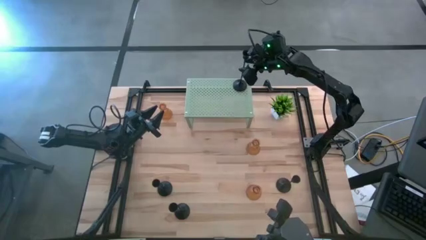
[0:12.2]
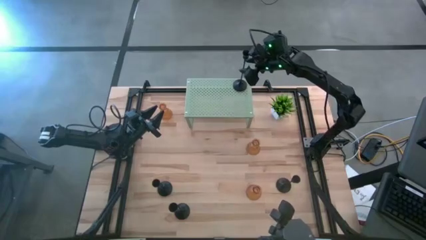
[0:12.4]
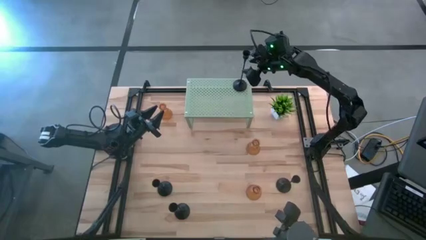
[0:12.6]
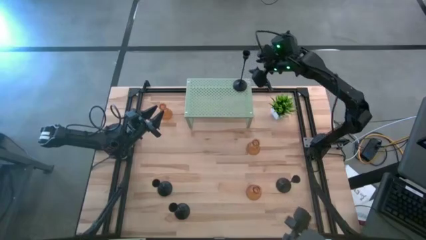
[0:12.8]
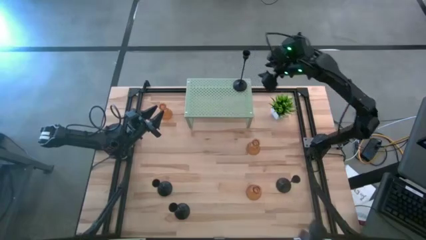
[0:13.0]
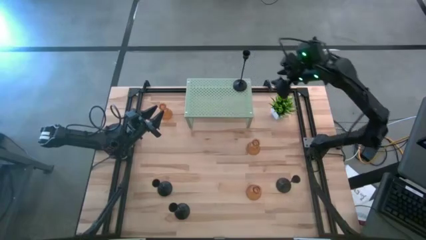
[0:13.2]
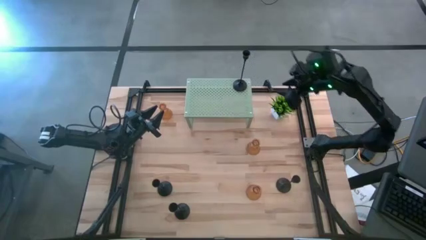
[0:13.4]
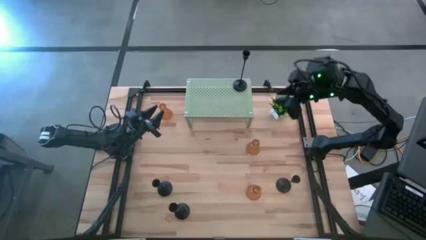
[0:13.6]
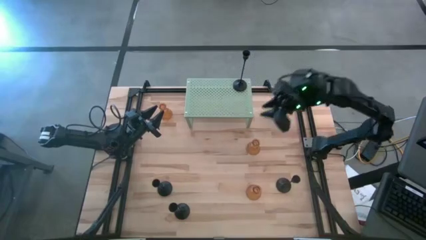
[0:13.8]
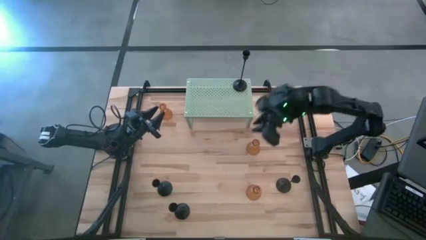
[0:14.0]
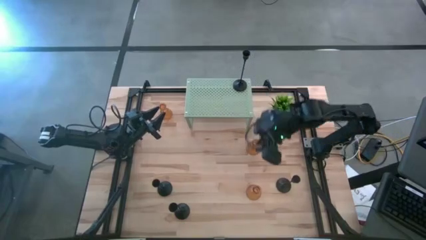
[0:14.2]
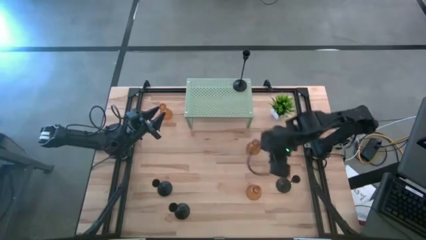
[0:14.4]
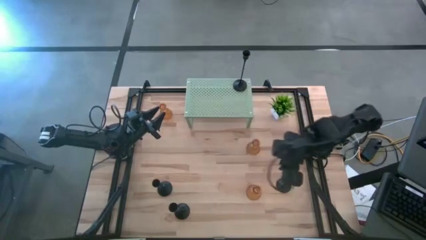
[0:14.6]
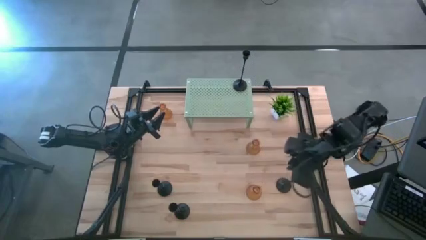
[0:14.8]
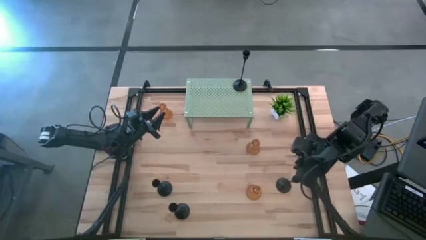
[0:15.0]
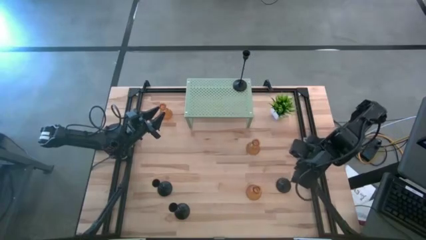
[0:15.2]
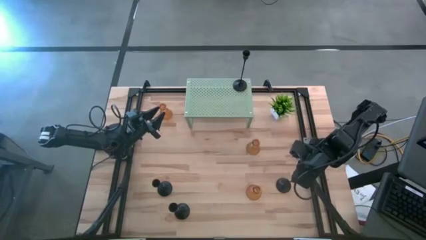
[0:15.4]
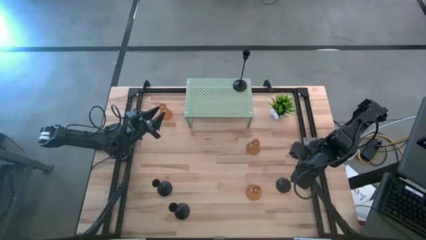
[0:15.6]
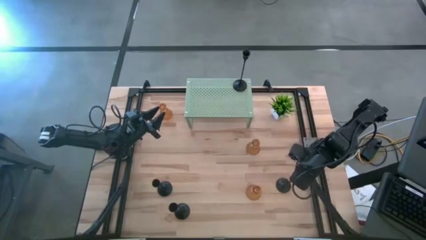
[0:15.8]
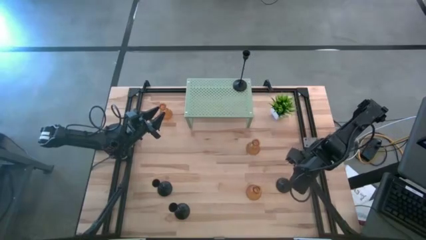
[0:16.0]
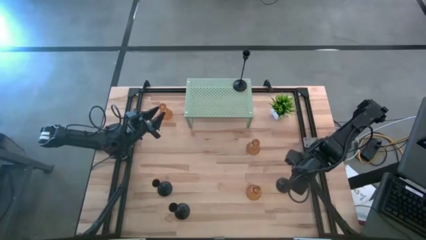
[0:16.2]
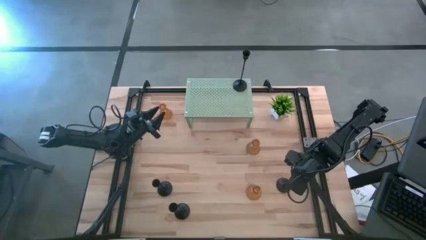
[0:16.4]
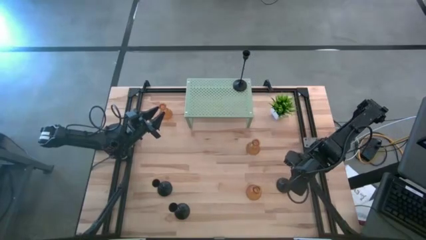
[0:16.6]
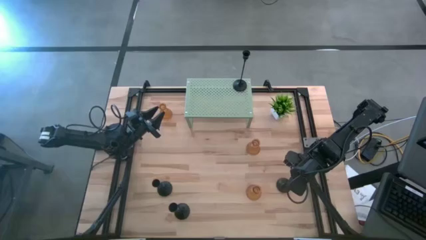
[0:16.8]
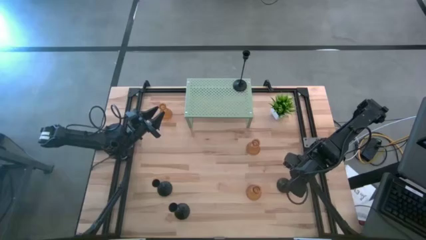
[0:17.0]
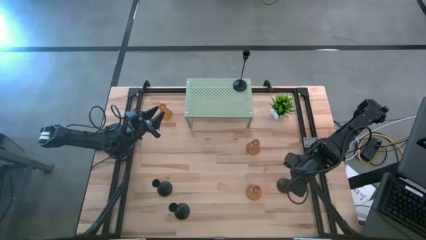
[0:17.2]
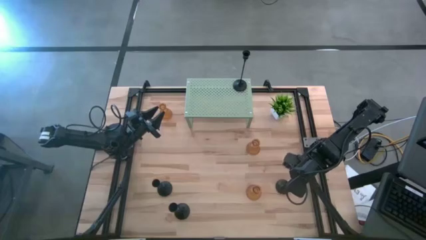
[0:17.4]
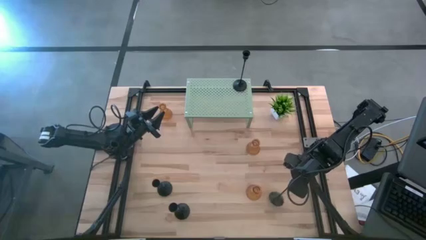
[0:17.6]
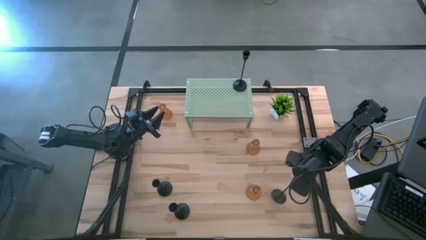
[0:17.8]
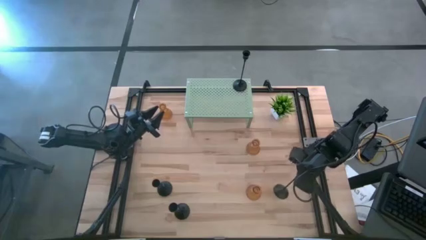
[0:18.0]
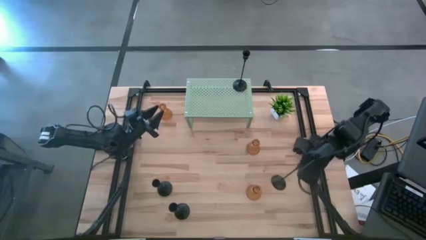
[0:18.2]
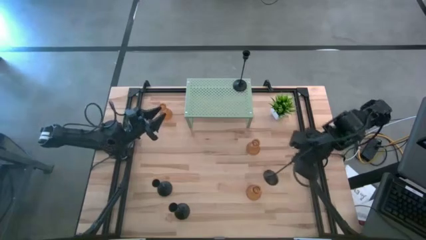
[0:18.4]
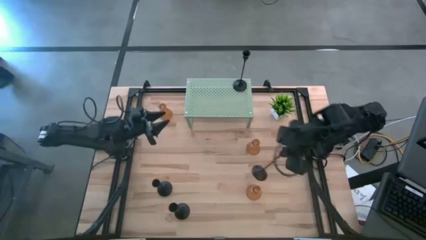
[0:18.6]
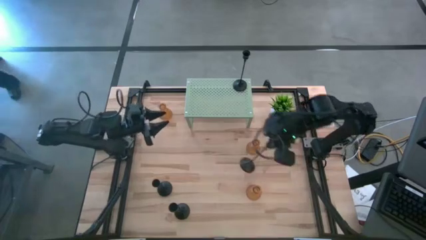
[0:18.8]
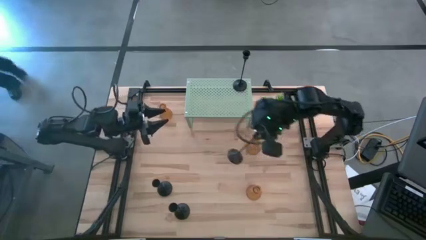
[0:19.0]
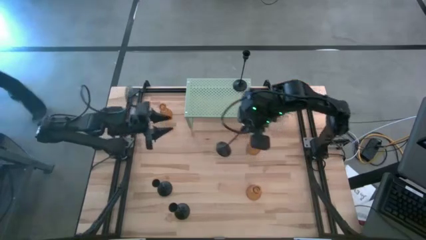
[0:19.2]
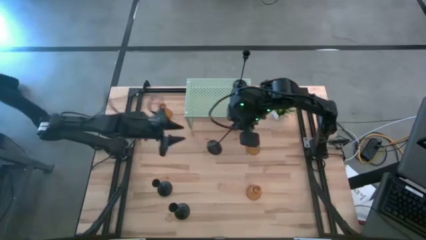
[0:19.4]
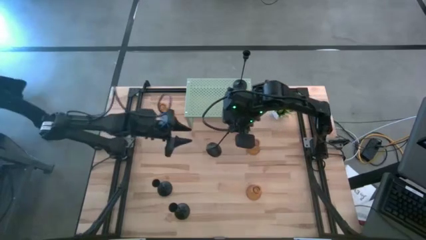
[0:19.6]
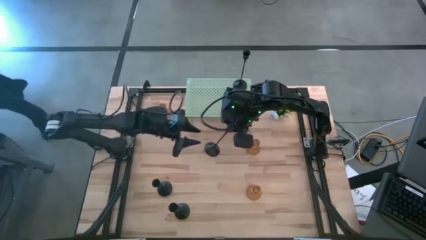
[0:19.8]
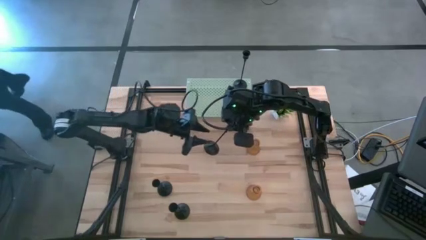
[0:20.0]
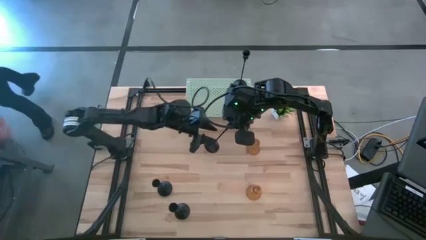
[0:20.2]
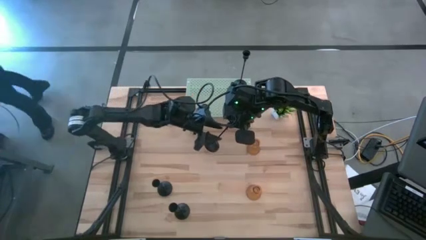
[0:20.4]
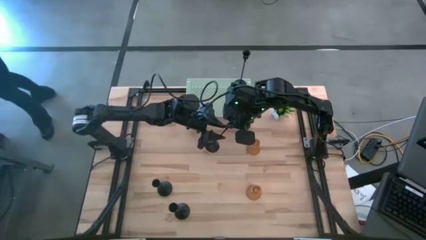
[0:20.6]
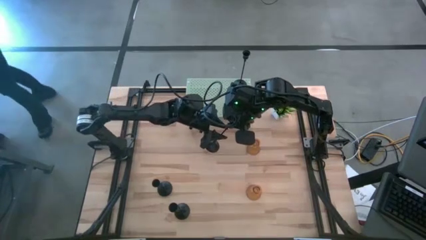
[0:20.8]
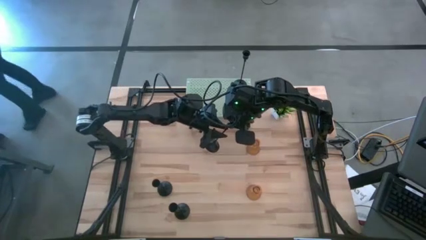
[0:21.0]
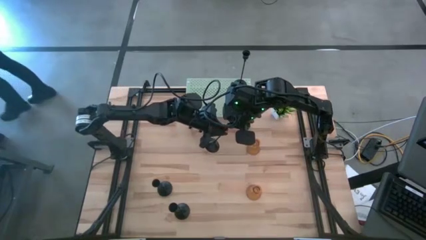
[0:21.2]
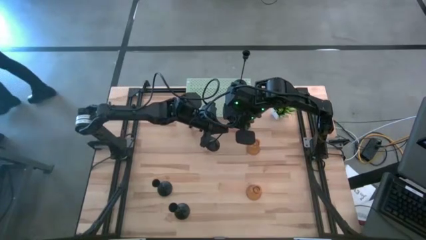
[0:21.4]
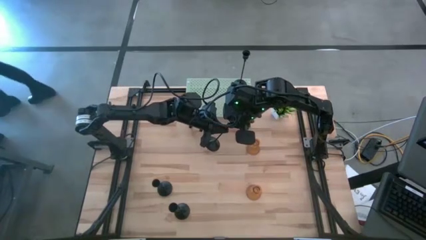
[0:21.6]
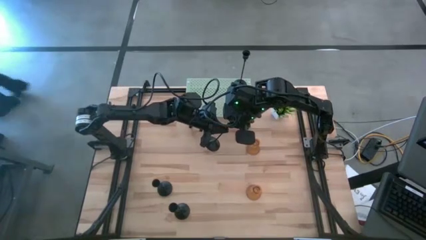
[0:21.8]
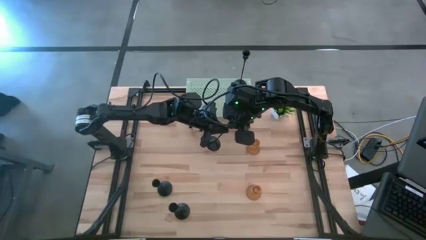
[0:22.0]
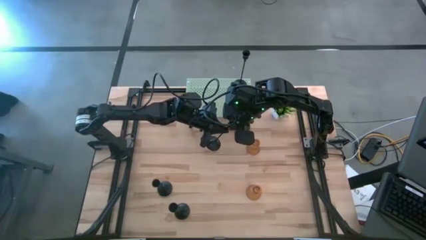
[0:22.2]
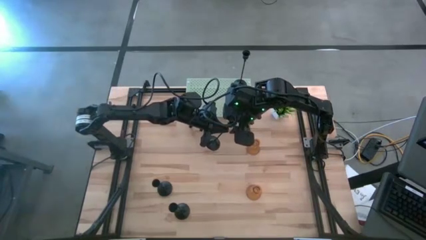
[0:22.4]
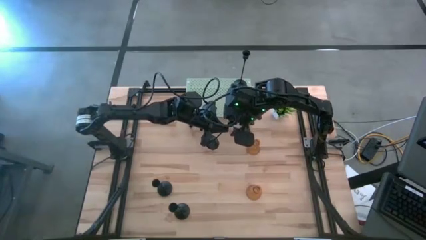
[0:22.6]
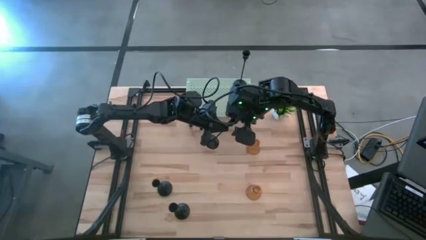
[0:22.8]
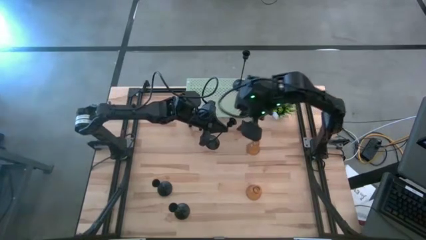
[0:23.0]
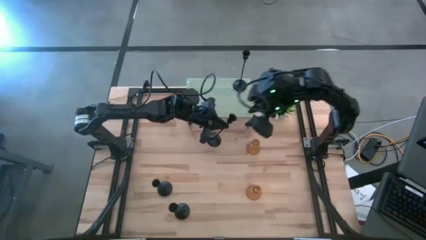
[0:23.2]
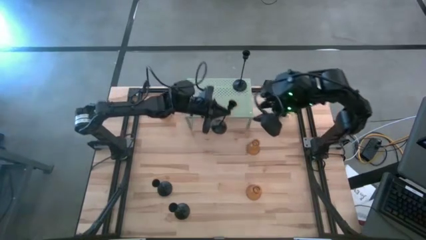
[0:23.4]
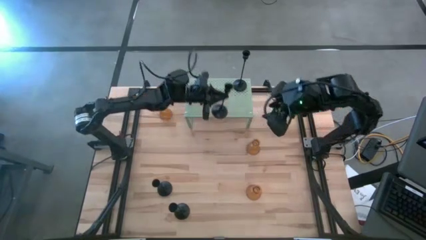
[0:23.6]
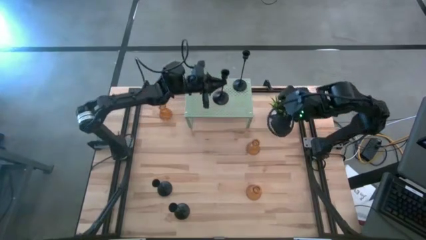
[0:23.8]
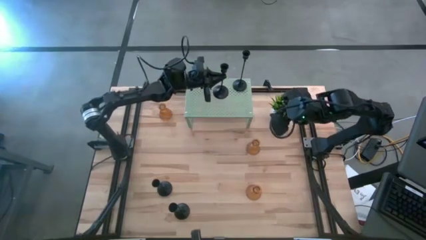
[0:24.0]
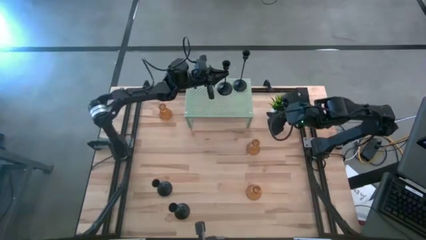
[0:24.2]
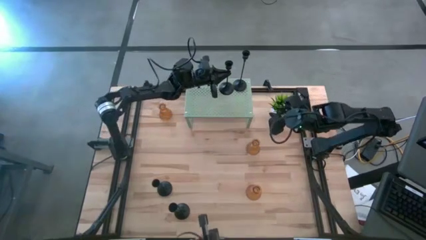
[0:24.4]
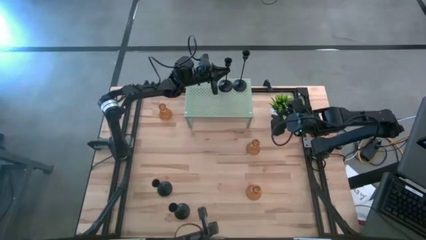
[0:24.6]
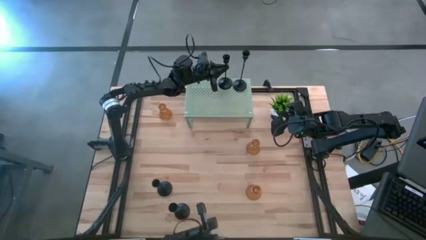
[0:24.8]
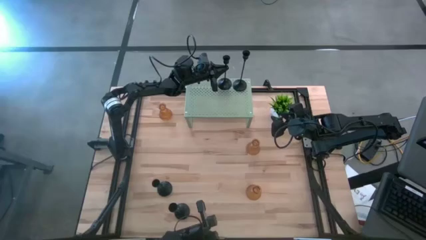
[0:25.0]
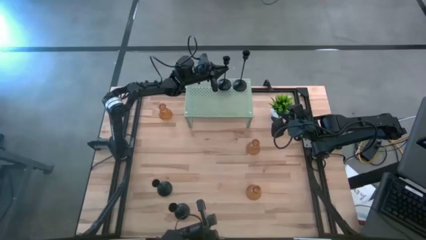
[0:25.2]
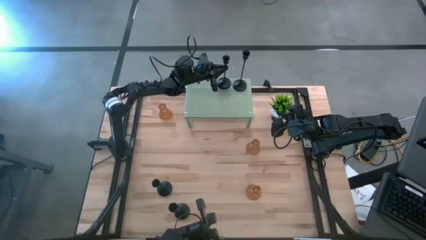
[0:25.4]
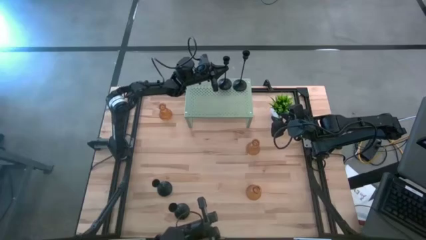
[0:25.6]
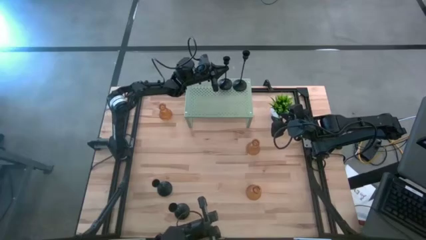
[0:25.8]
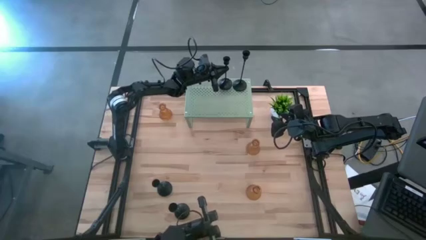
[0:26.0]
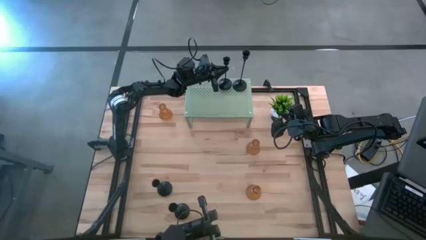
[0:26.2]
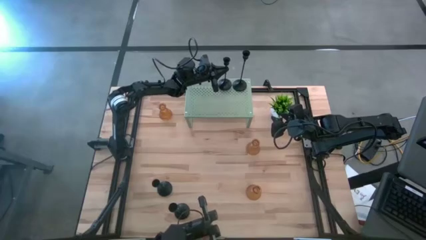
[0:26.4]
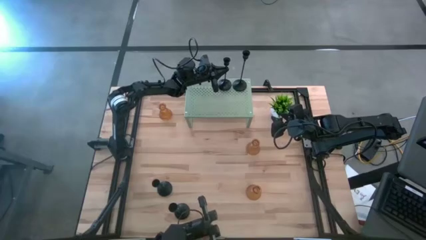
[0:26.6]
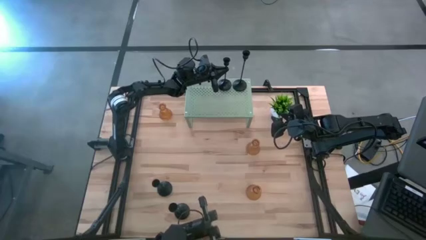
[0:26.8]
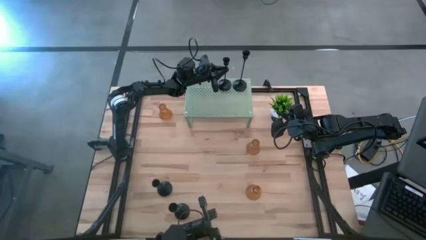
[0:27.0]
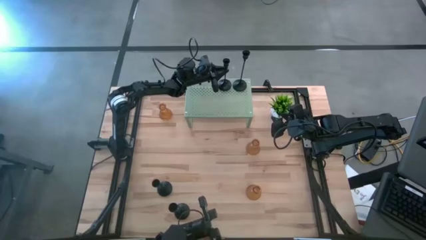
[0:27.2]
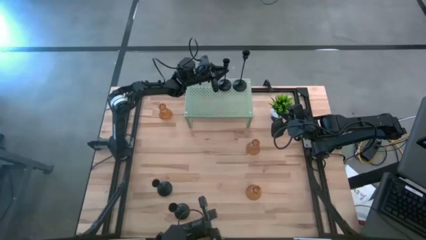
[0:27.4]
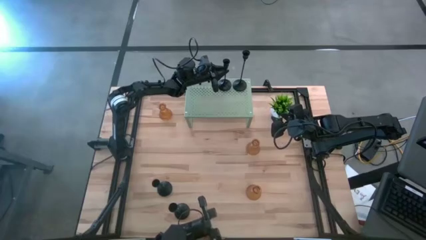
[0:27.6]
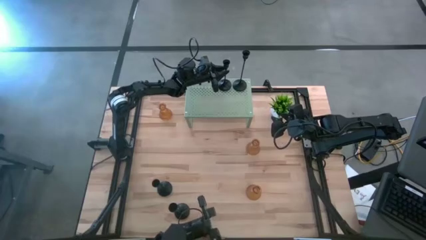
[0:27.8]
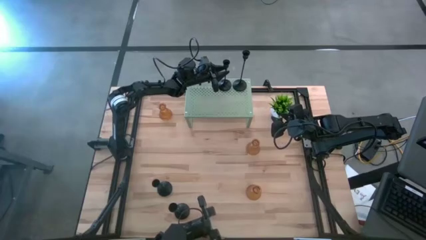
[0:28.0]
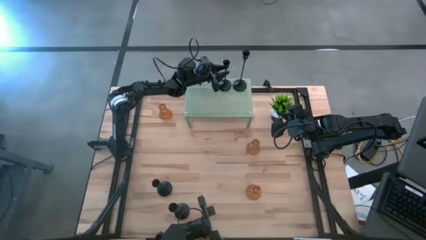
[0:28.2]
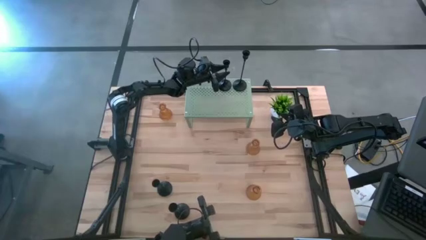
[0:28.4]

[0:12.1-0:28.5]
Task: Pick & Place candle stick holders
Put the right black candle holder on the shelf aligned with the other black candle holder
